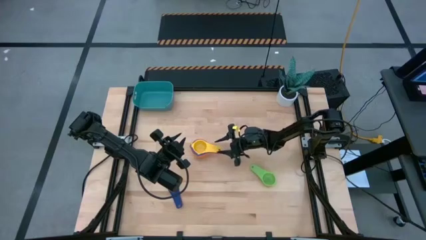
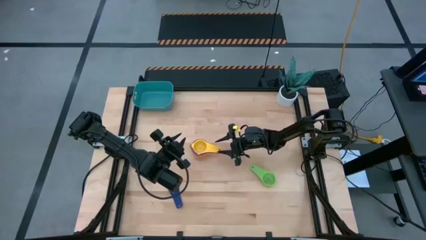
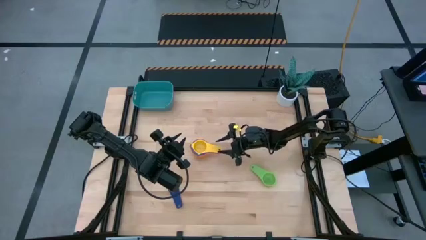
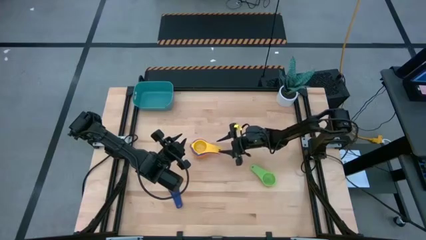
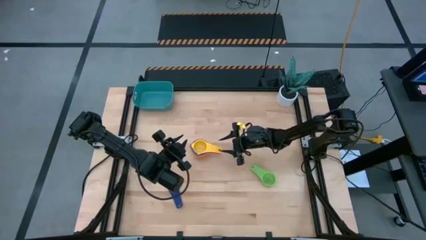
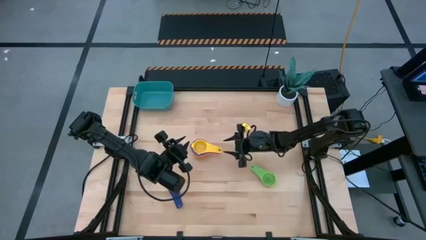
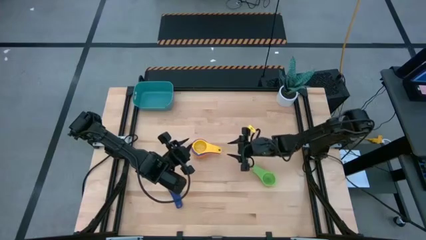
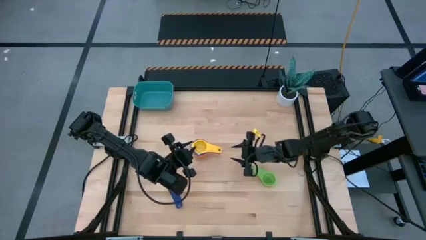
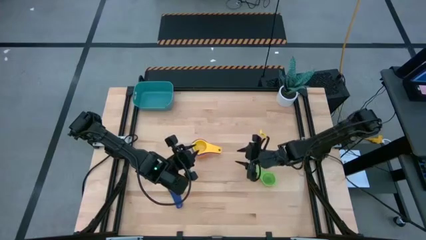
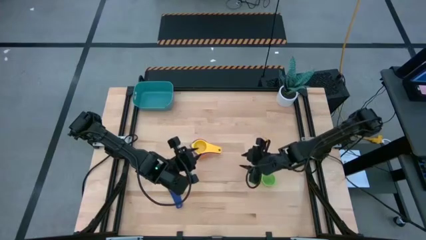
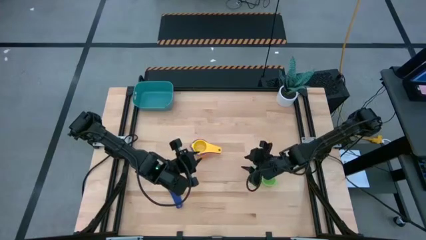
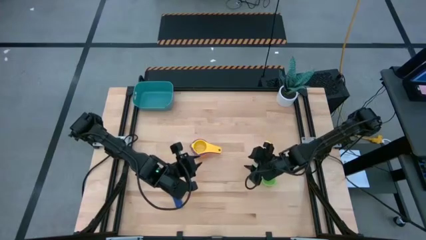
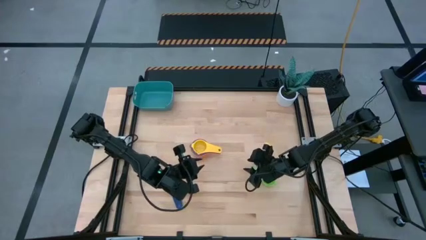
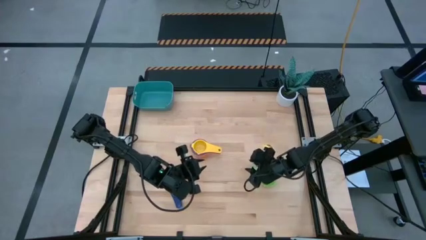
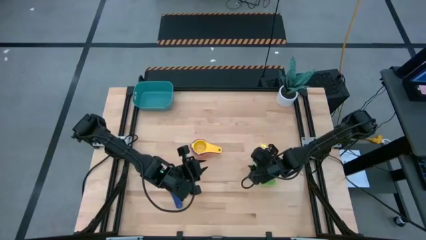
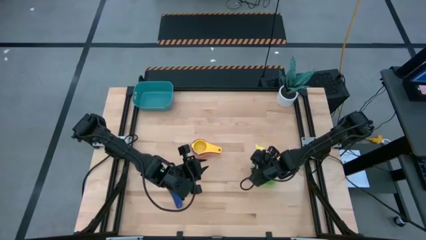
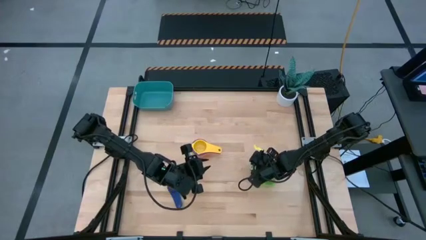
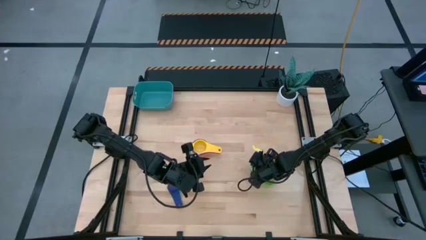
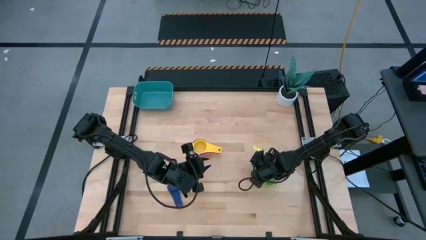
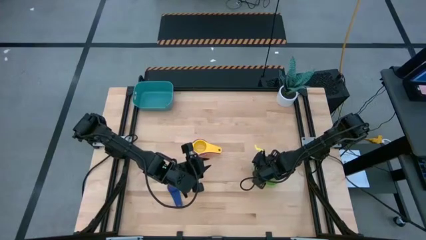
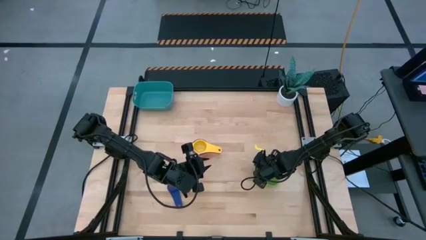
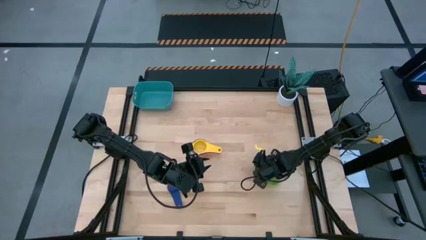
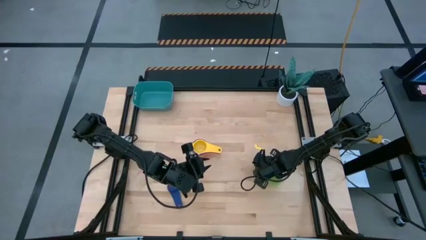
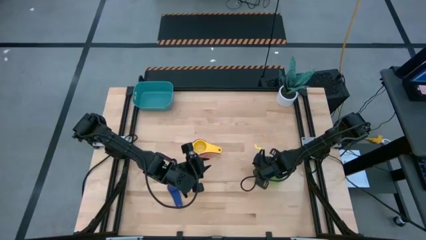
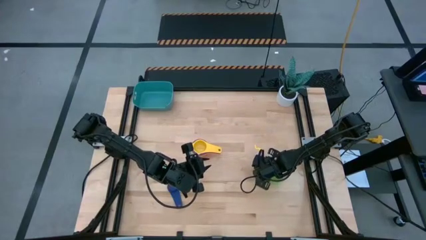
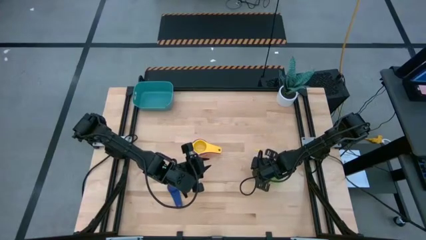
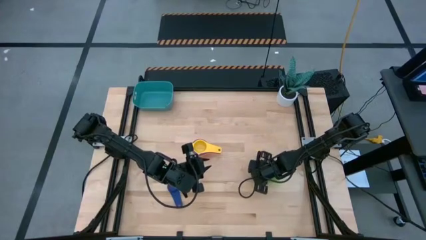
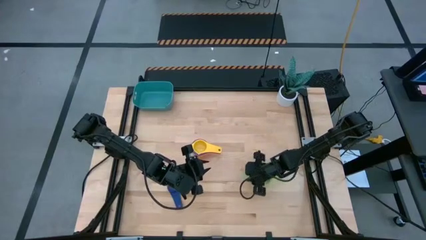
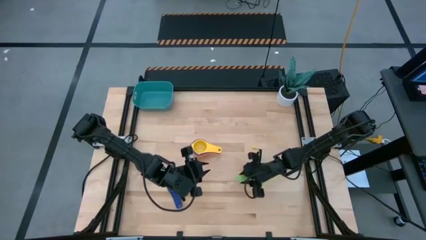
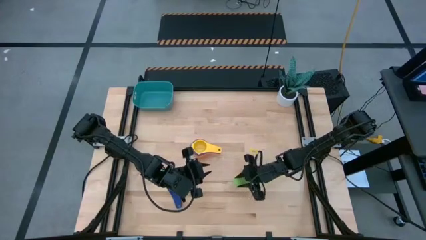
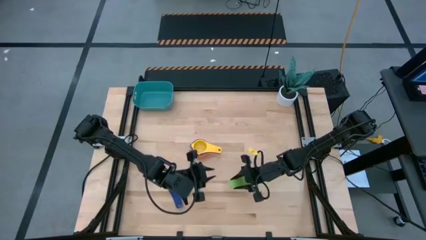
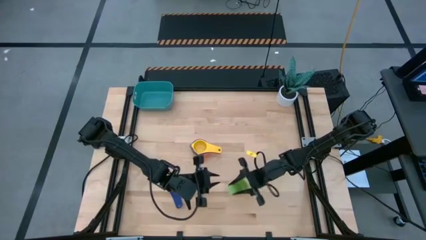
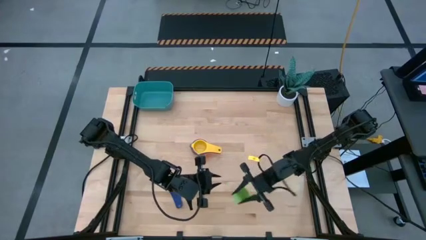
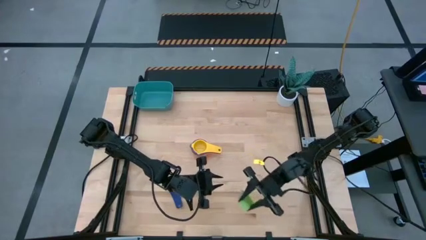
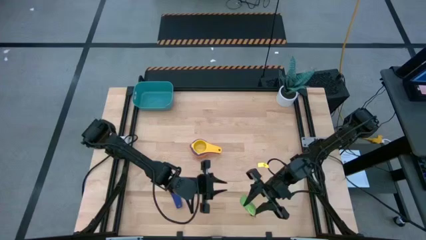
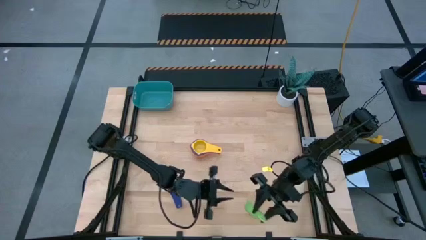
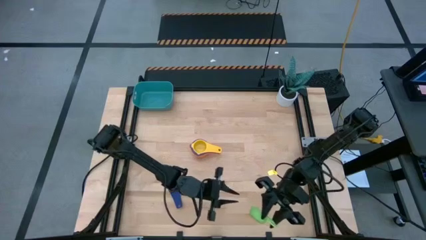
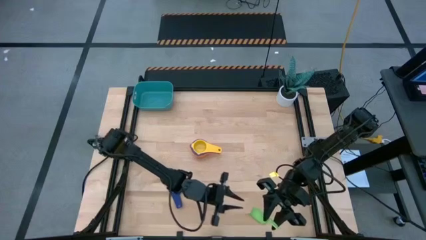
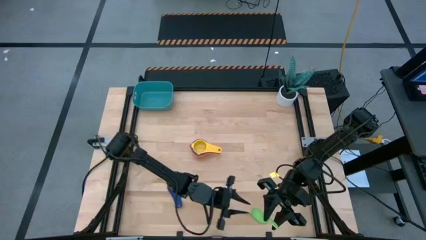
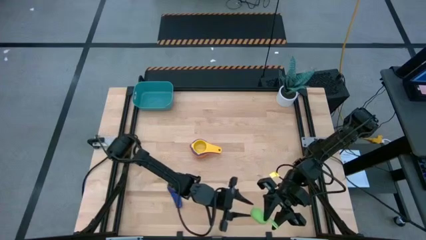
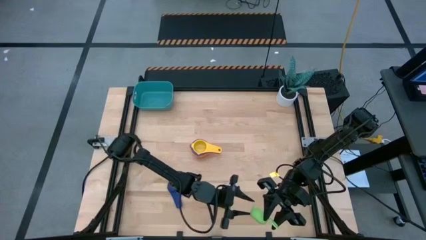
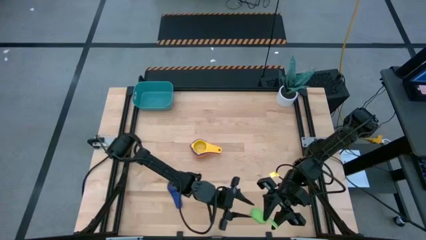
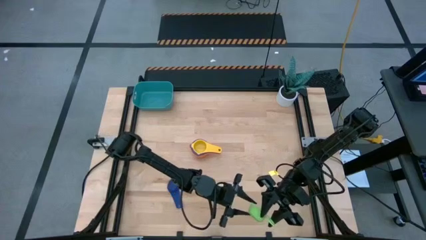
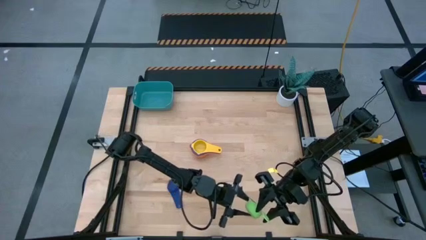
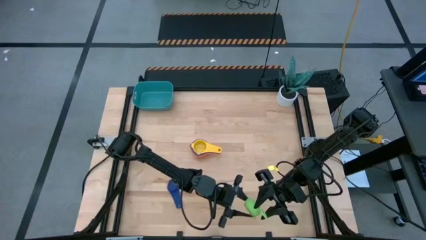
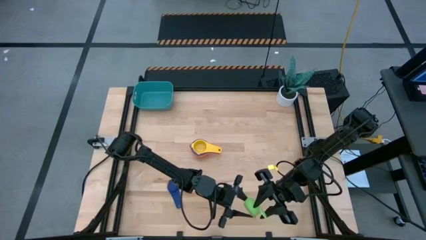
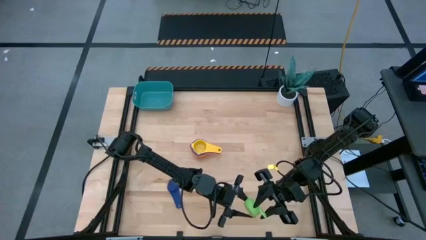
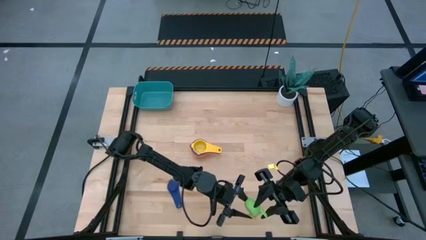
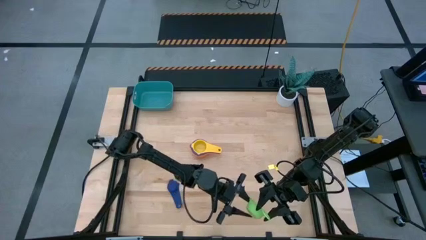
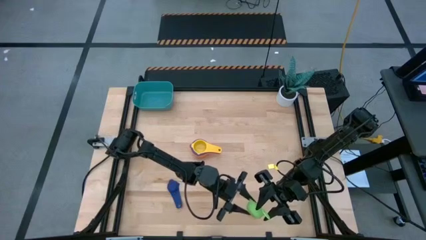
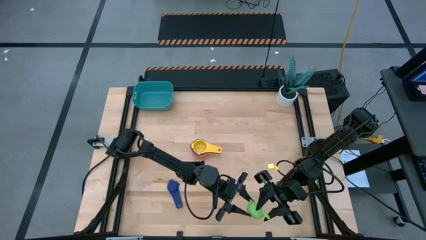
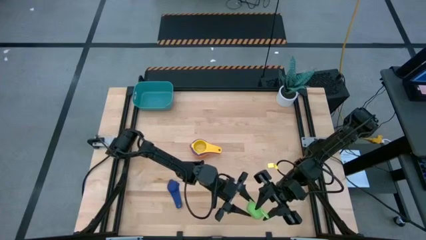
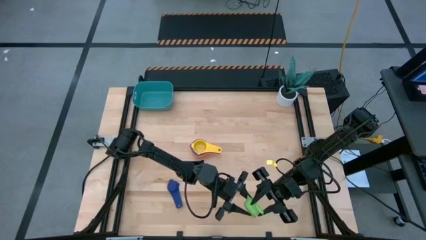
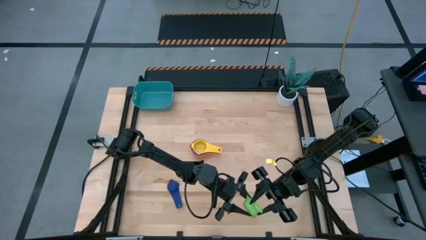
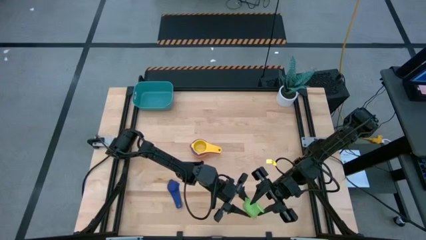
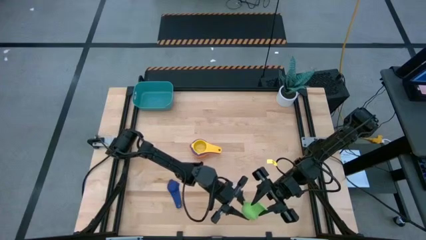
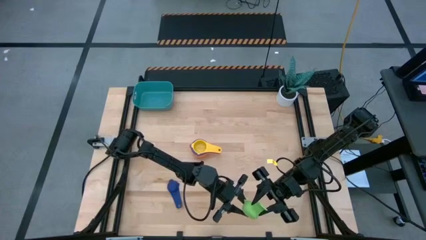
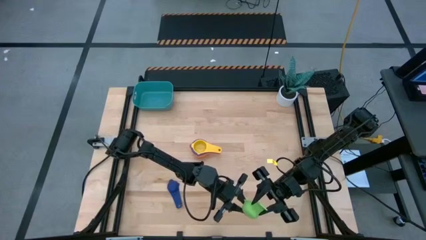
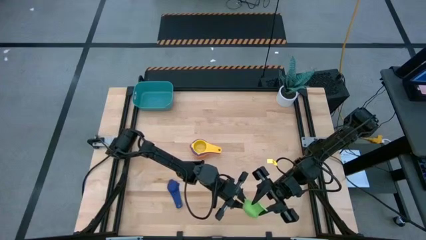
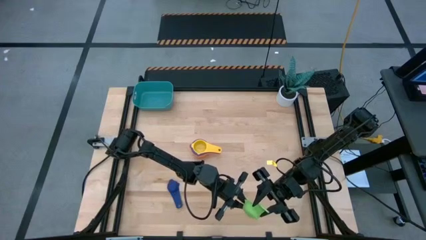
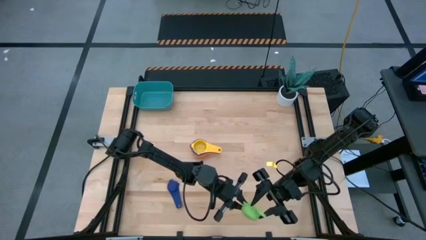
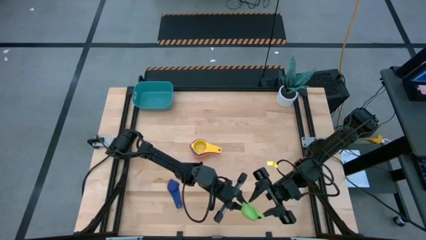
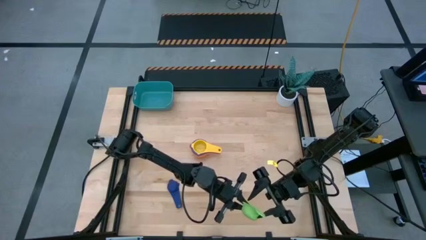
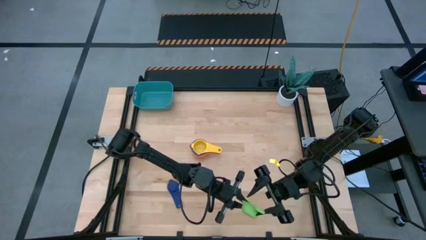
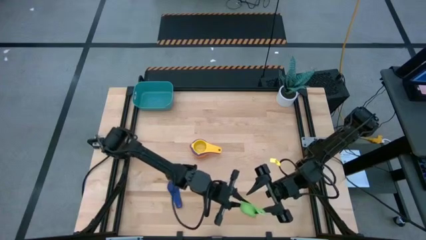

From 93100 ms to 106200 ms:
Task: Nest measuring cups in basket
Stack the green measuring cup on top of the yellow measuring cup

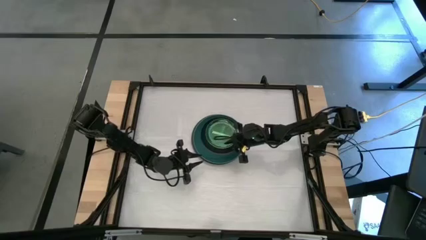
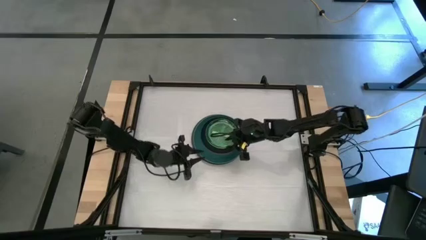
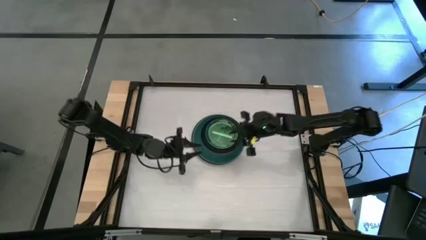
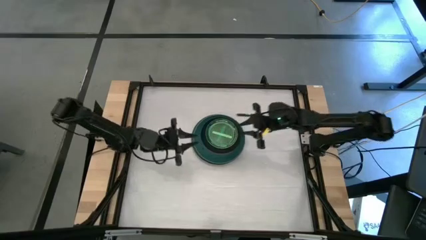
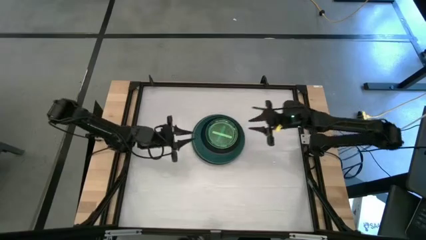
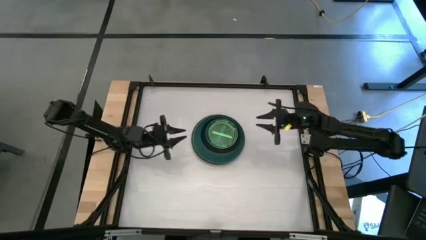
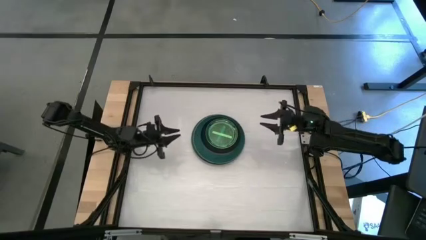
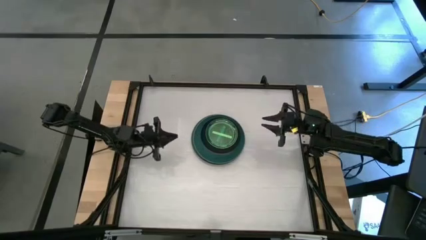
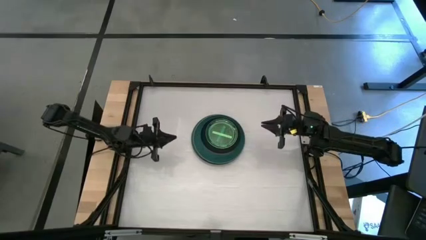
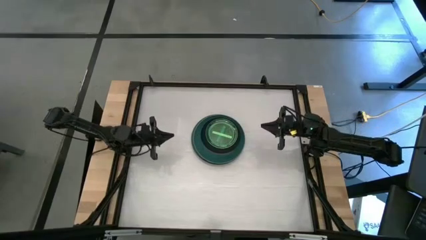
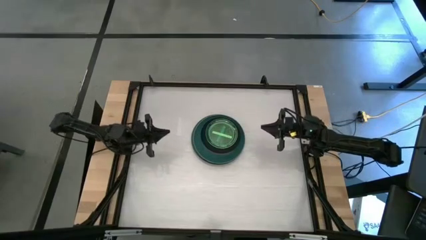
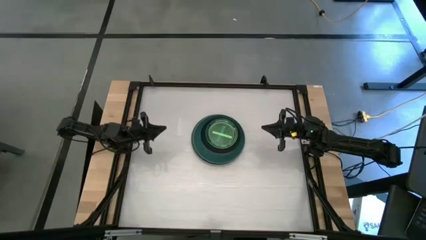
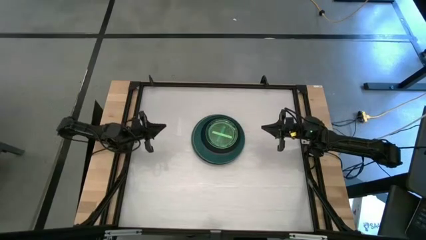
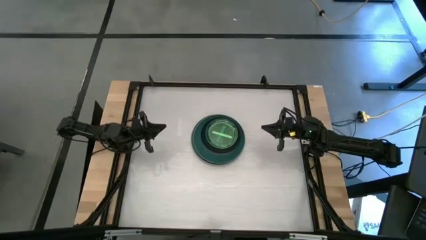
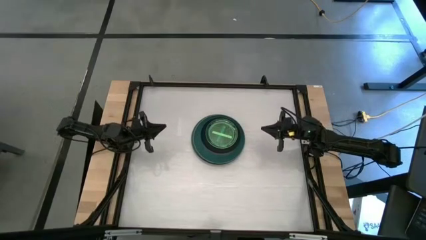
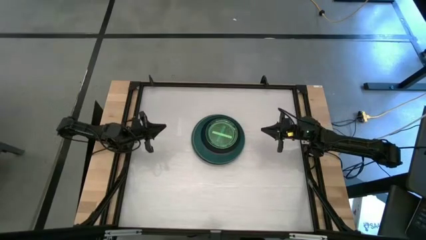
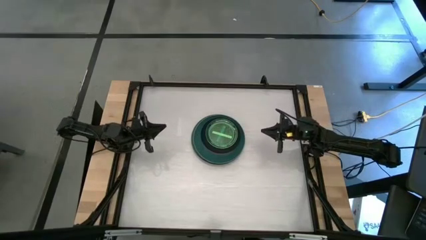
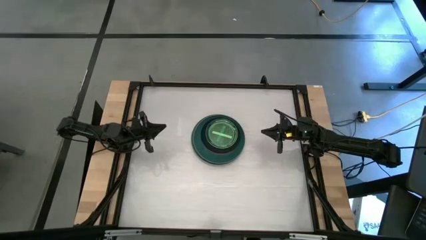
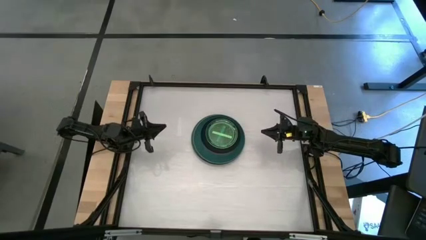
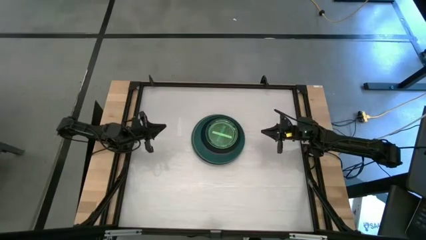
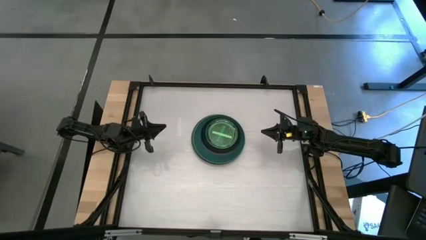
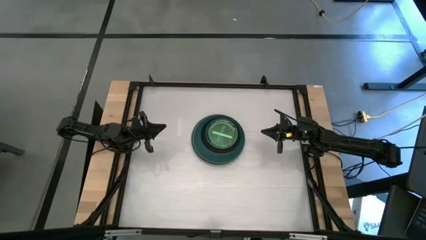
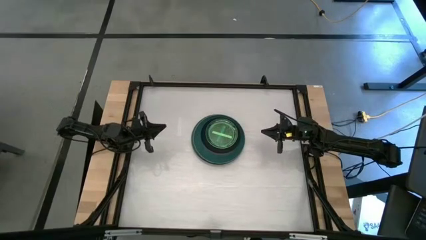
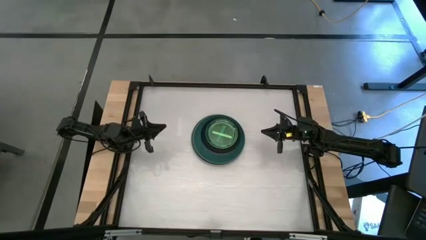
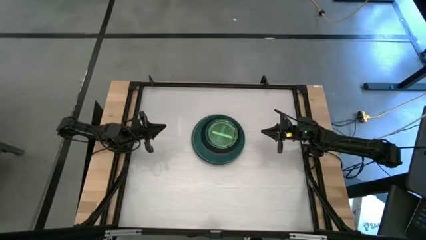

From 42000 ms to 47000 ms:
Task: Stack plastic plates
Return to Home Position
